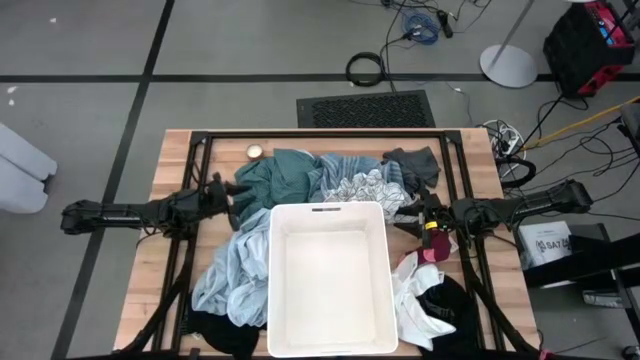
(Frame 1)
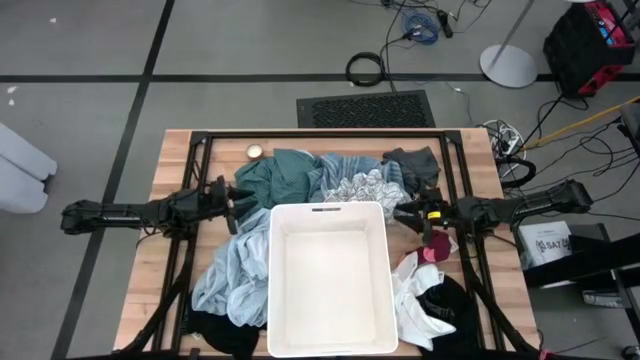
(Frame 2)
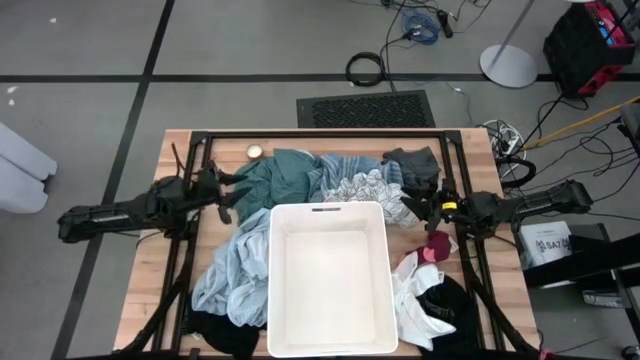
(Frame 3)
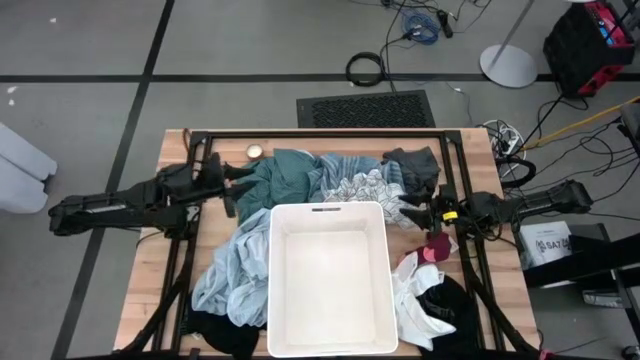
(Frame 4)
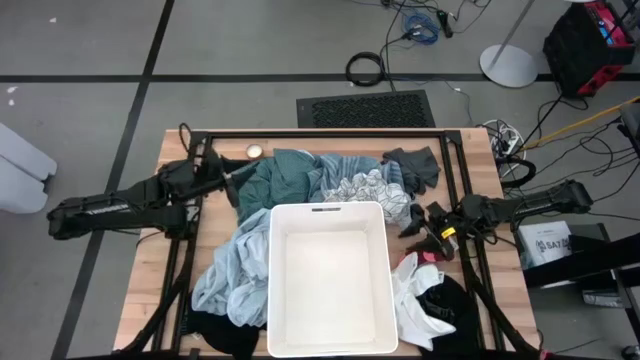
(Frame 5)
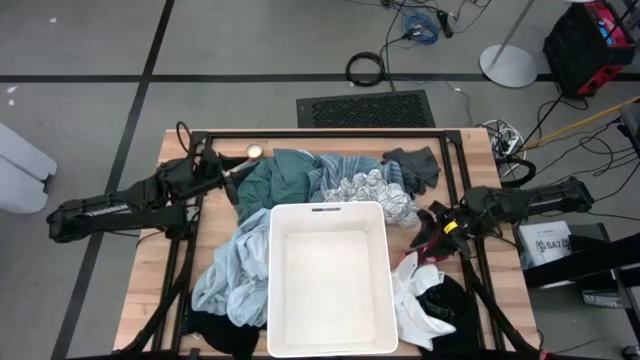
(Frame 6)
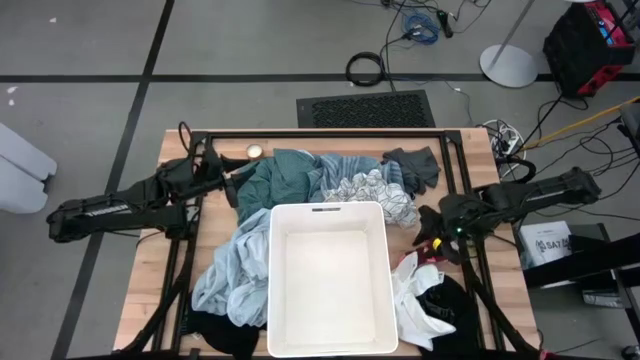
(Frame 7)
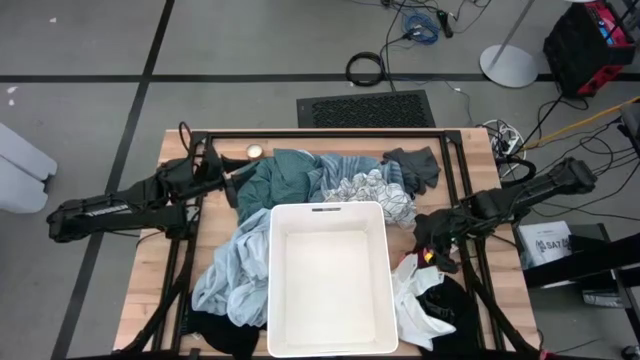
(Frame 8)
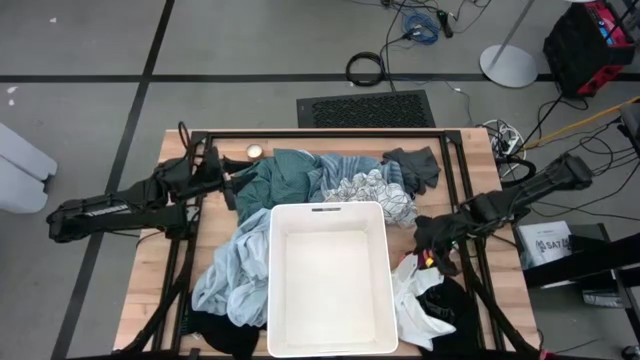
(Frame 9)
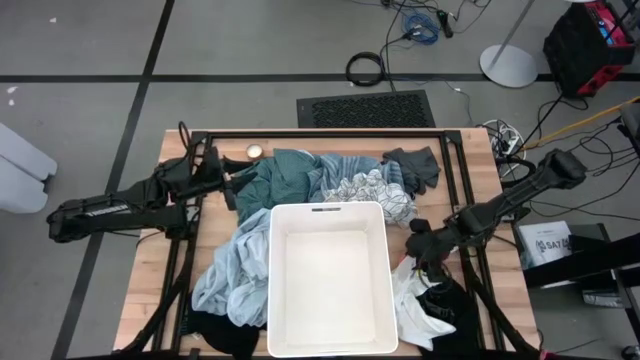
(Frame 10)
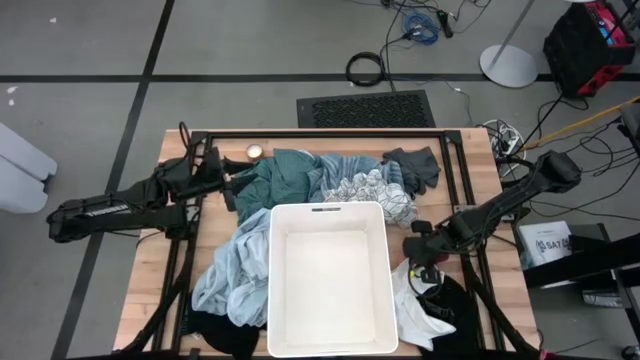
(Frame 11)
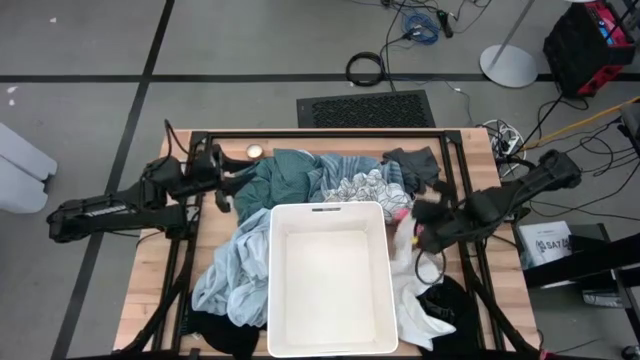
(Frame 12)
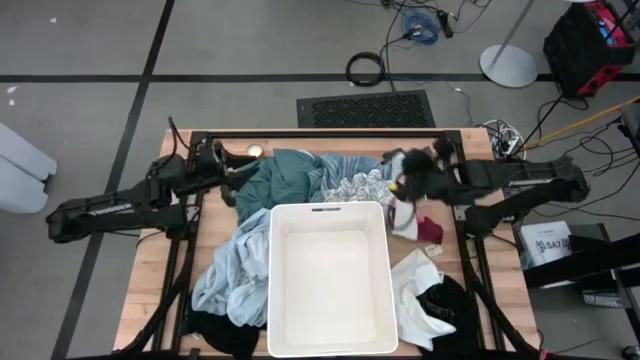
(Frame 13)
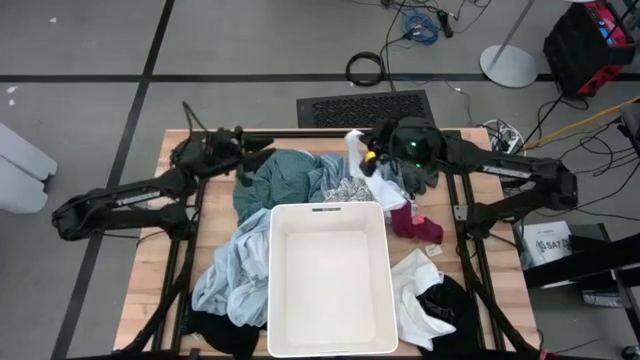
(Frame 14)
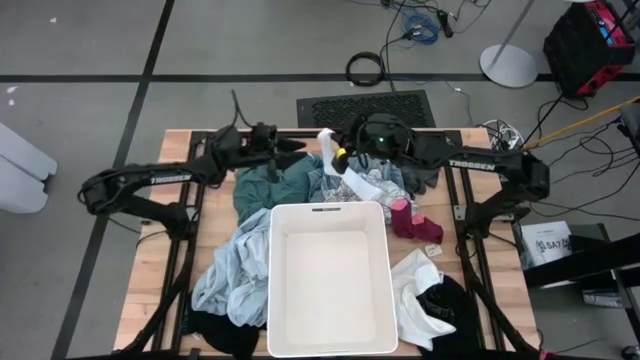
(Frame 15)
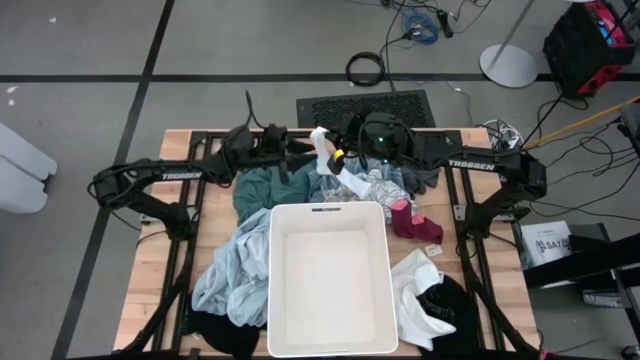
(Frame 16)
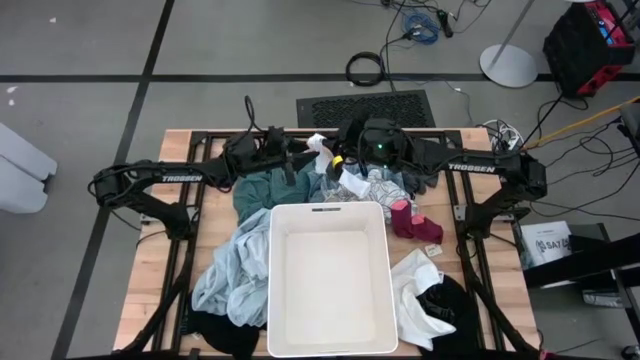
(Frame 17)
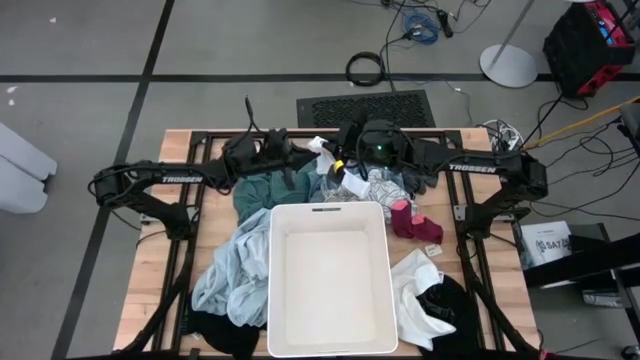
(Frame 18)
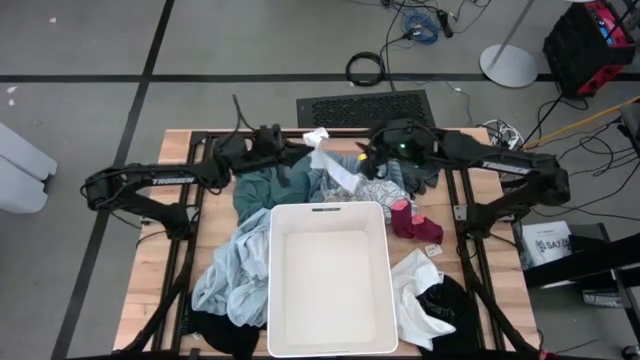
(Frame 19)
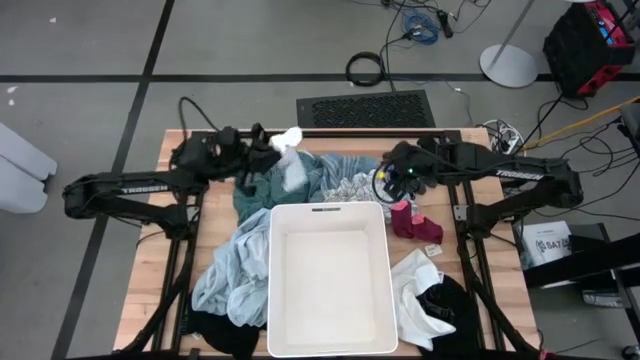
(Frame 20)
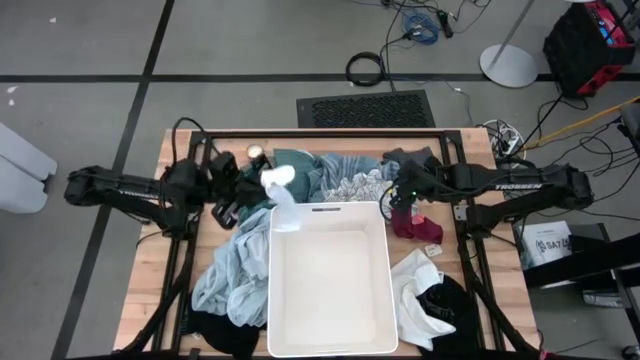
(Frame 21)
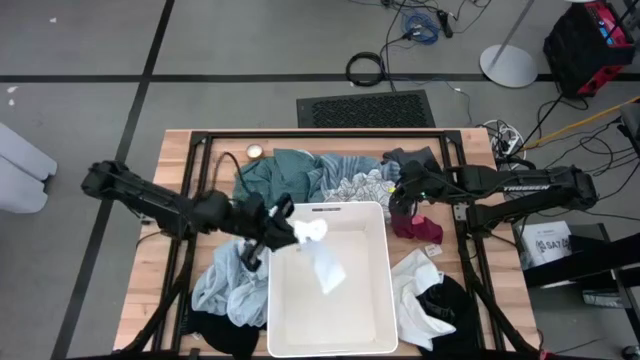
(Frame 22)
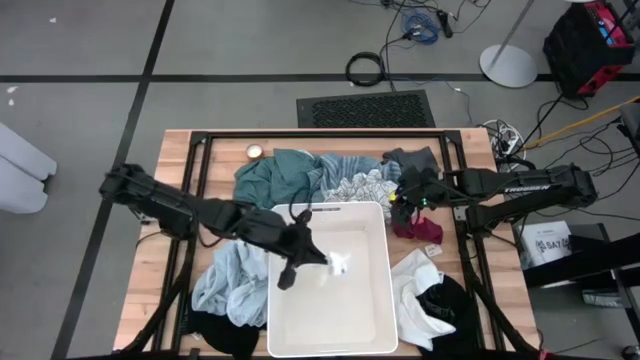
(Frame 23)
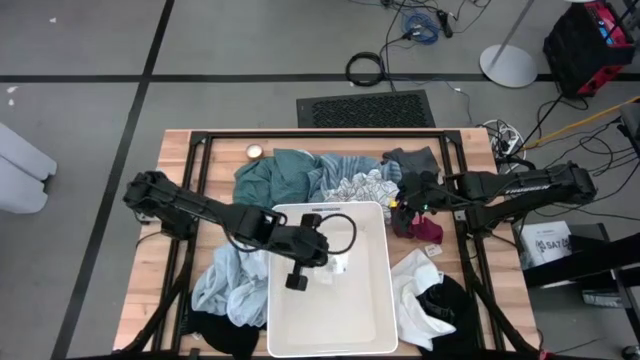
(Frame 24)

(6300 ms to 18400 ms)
Task: Sort clothes
Put the sock into the white laundry bin

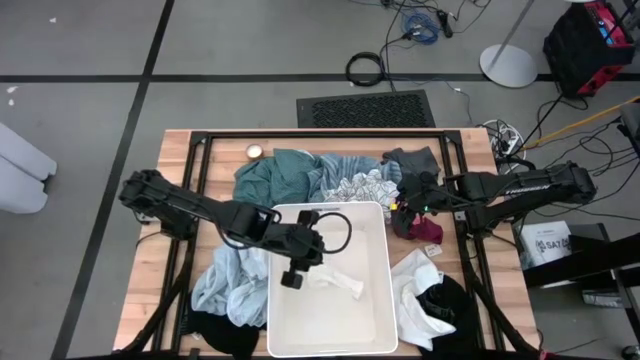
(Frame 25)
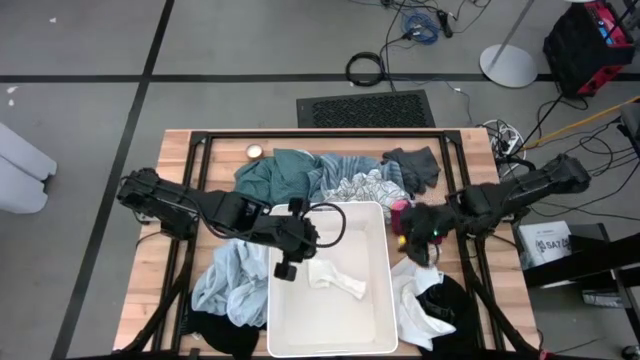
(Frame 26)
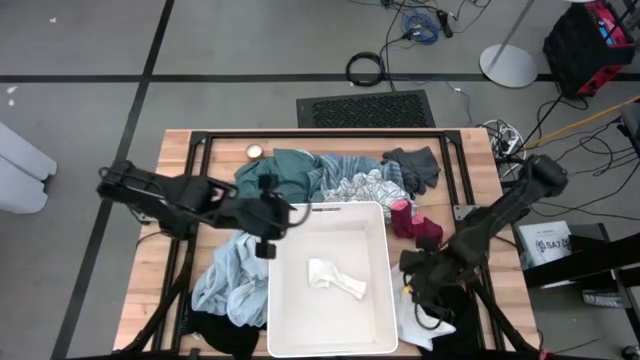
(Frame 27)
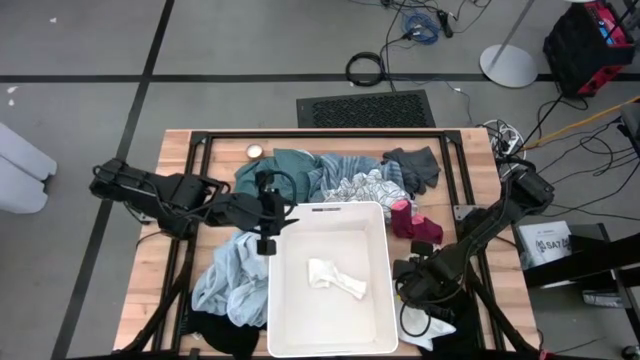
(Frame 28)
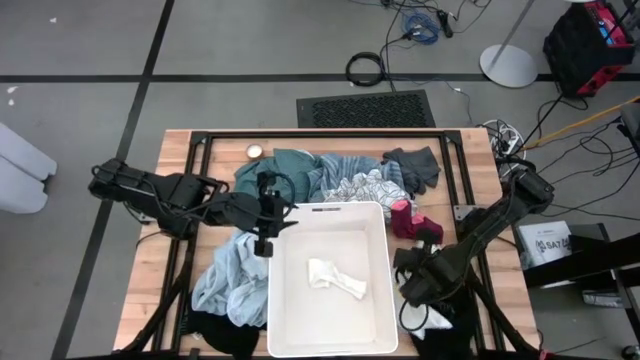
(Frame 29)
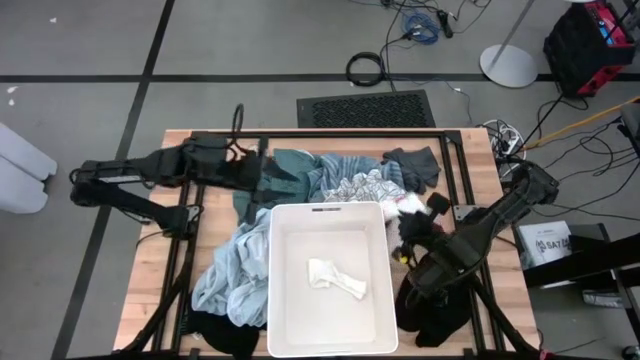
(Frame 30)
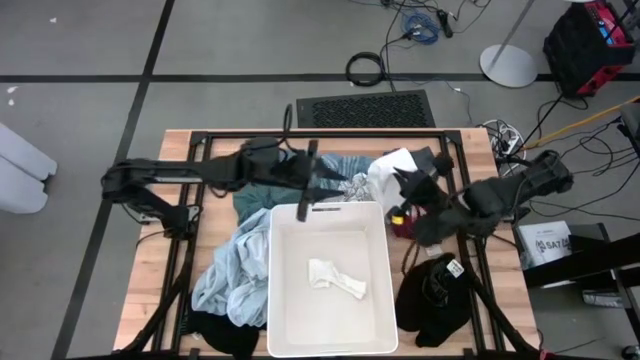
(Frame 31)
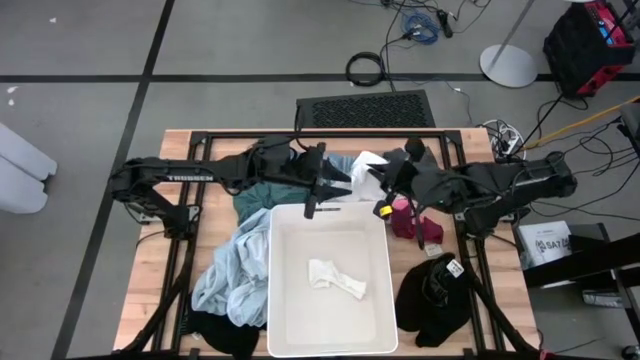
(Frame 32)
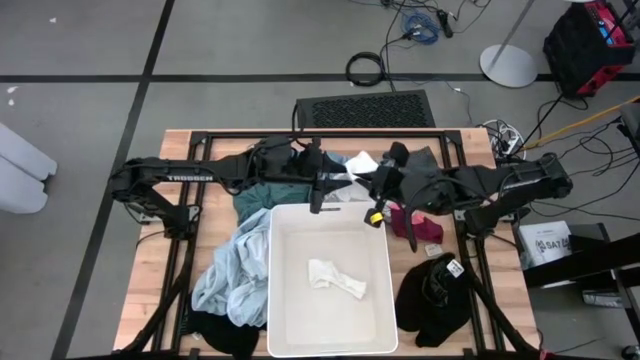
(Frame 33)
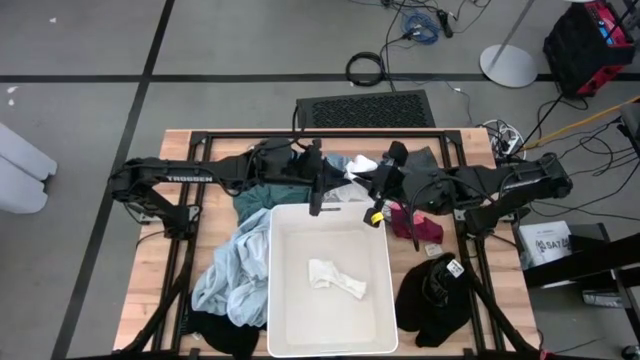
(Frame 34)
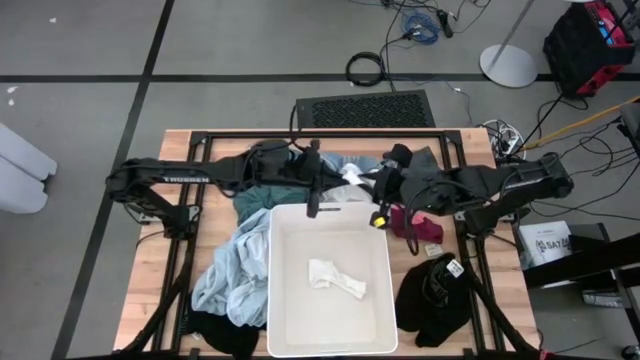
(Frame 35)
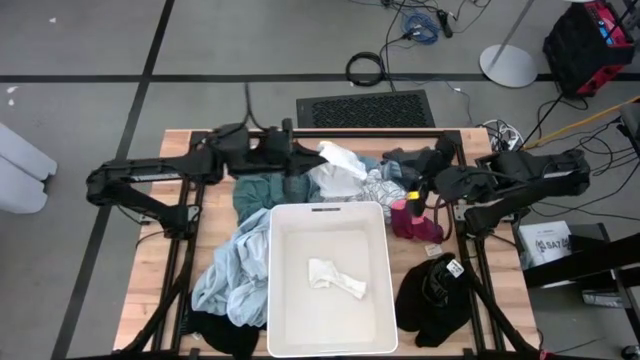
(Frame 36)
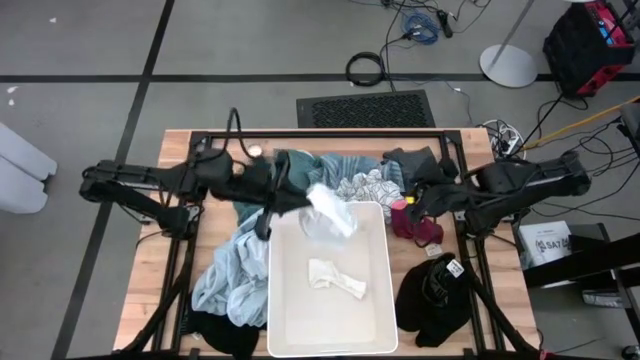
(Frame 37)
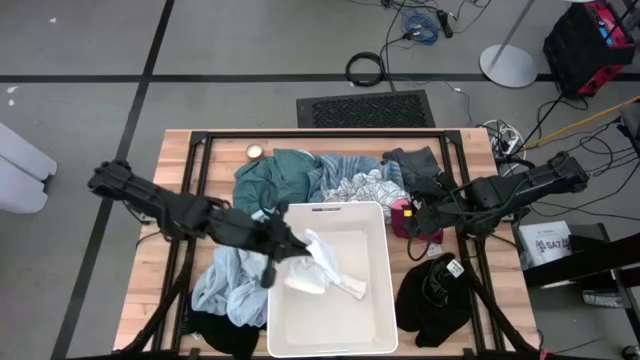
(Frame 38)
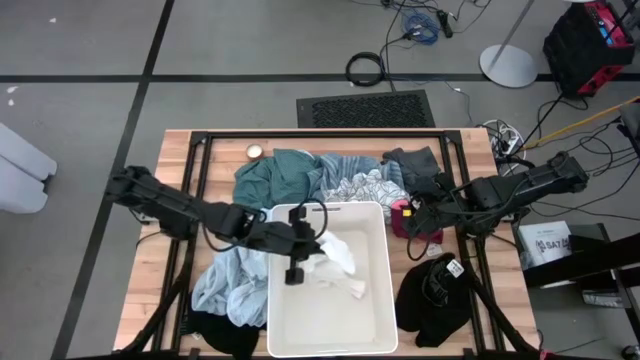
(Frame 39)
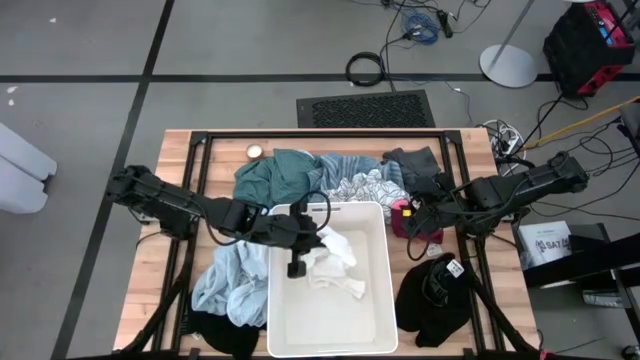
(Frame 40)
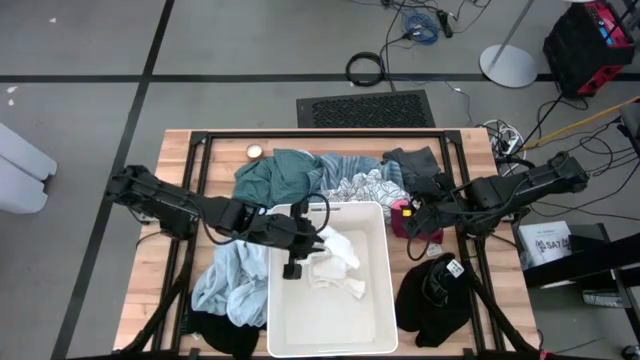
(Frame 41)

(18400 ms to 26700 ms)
Put the white cloth into the white laundry bin
